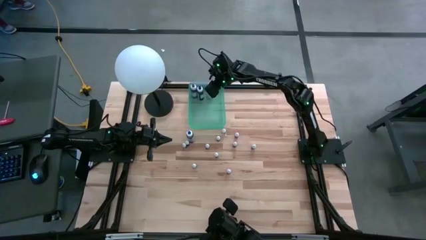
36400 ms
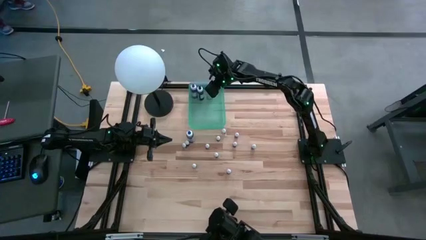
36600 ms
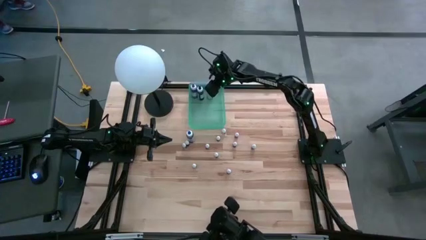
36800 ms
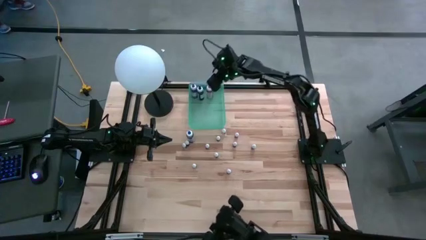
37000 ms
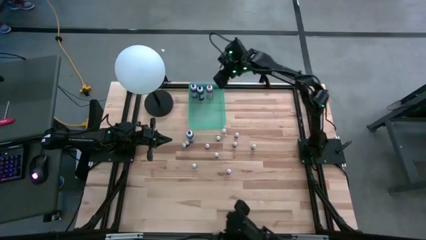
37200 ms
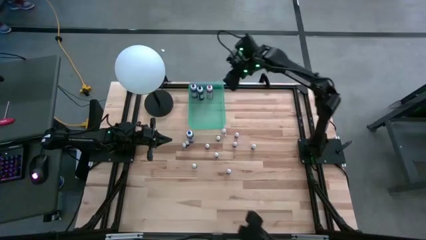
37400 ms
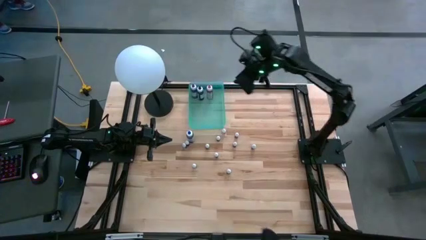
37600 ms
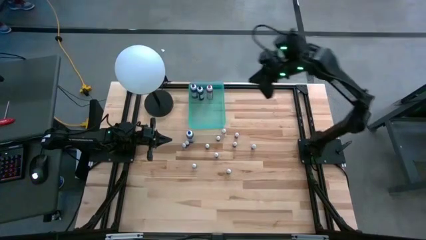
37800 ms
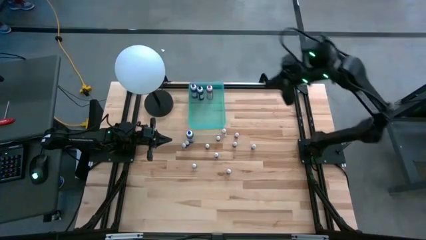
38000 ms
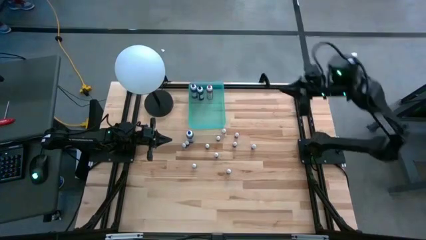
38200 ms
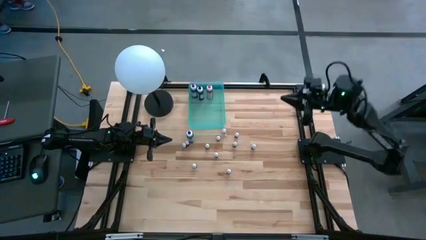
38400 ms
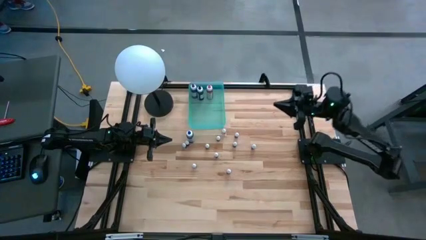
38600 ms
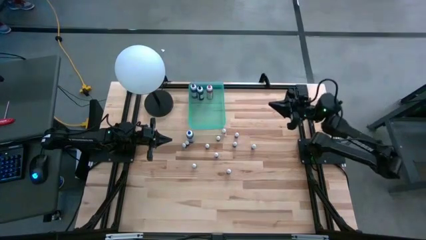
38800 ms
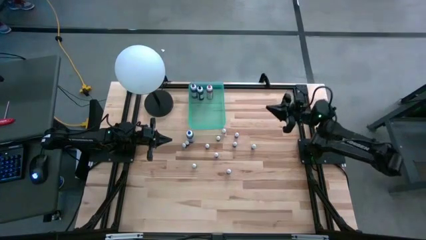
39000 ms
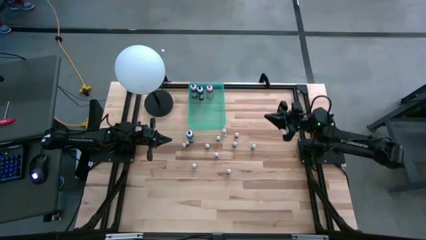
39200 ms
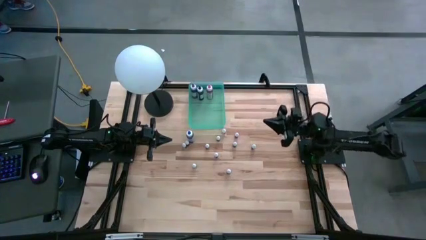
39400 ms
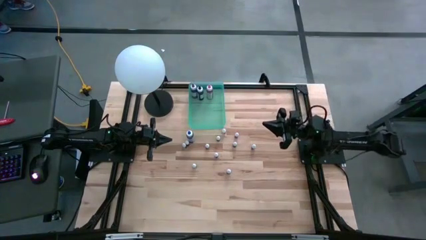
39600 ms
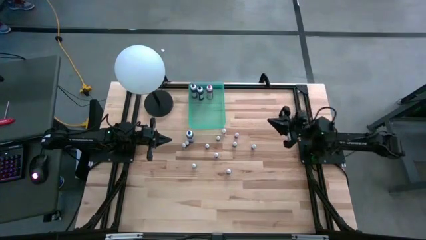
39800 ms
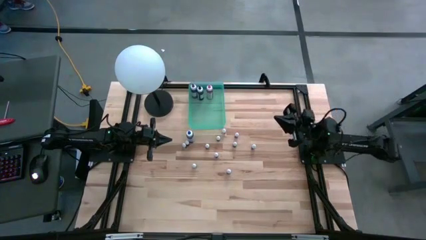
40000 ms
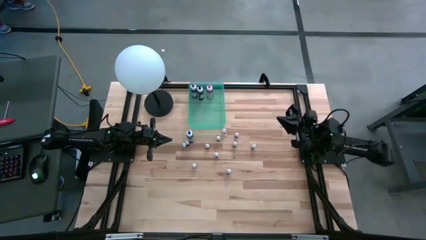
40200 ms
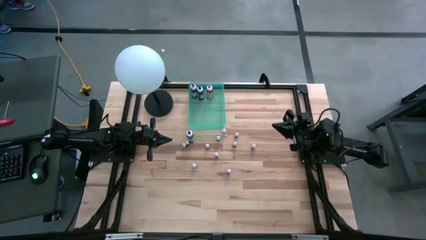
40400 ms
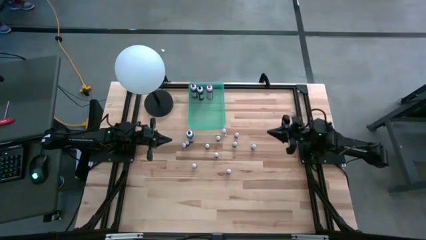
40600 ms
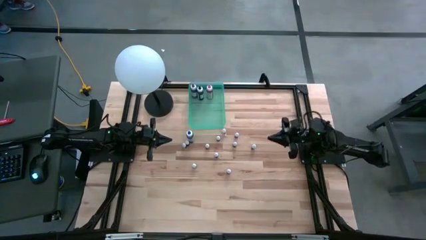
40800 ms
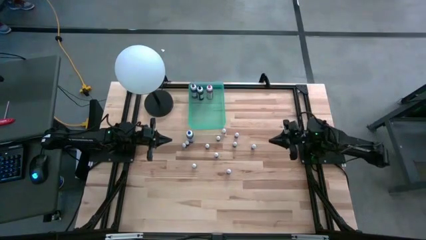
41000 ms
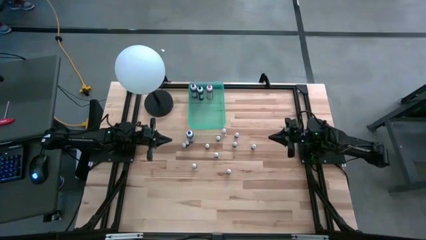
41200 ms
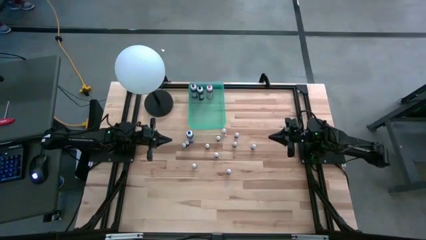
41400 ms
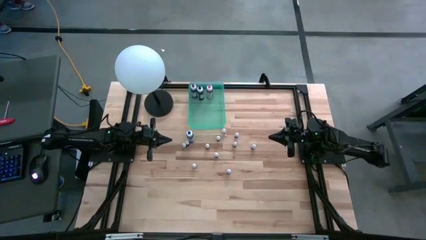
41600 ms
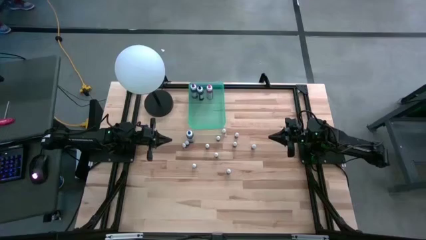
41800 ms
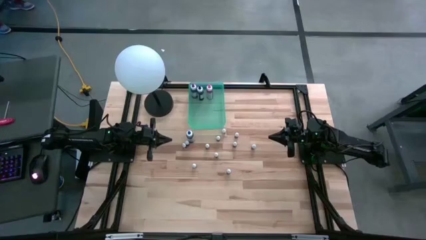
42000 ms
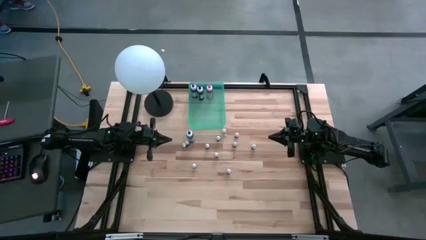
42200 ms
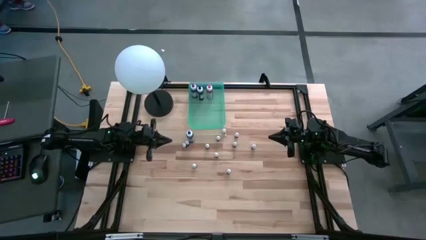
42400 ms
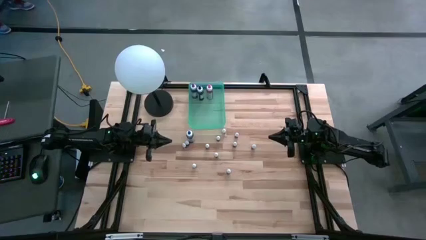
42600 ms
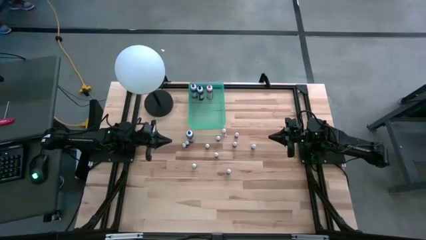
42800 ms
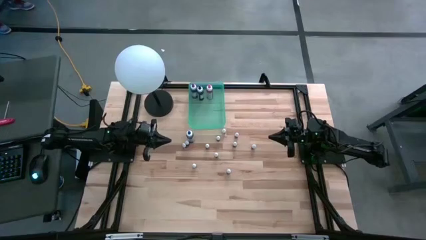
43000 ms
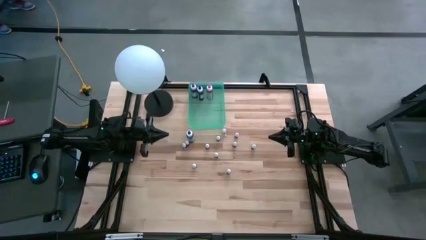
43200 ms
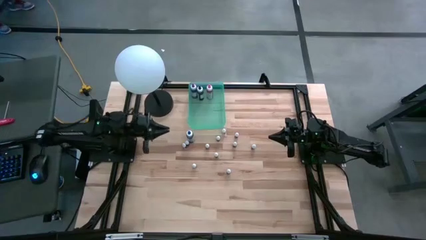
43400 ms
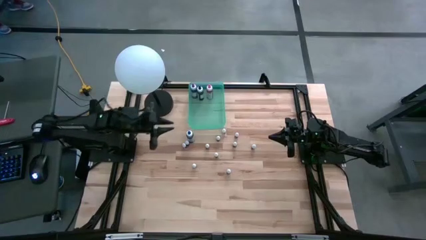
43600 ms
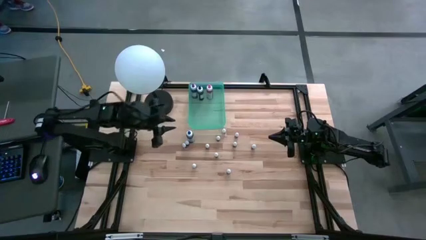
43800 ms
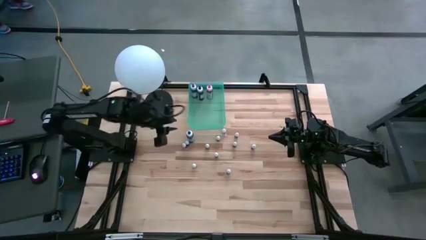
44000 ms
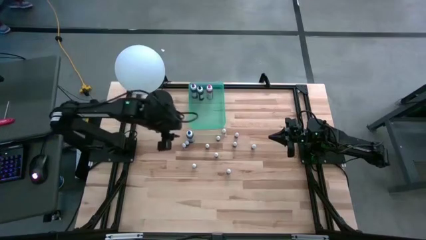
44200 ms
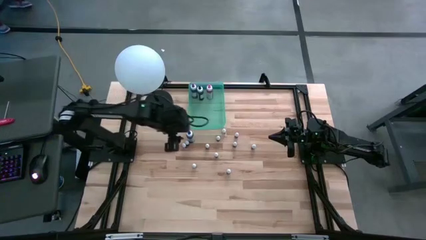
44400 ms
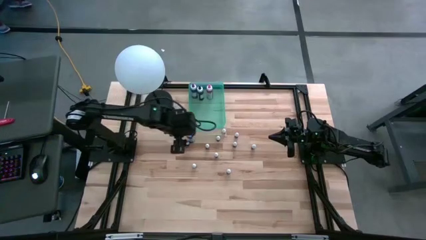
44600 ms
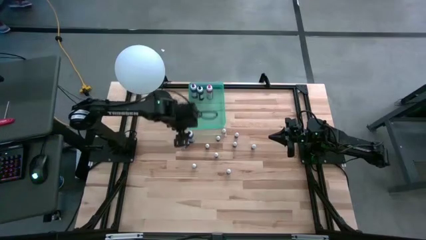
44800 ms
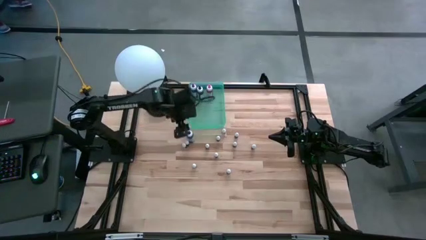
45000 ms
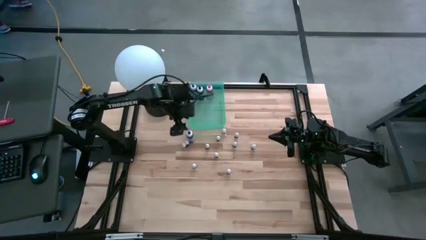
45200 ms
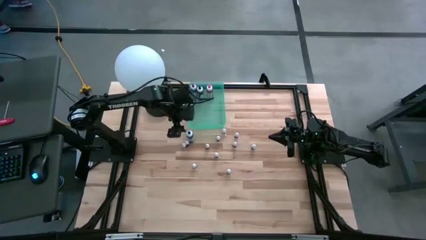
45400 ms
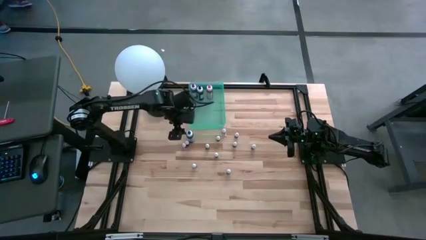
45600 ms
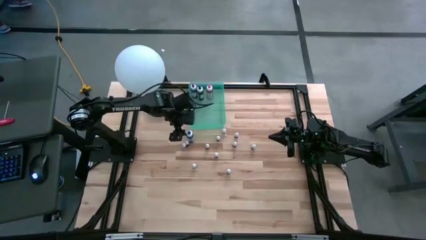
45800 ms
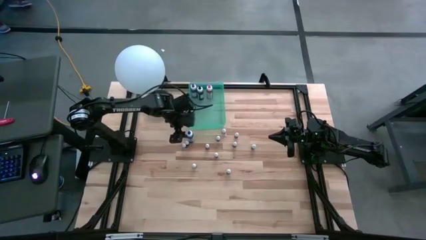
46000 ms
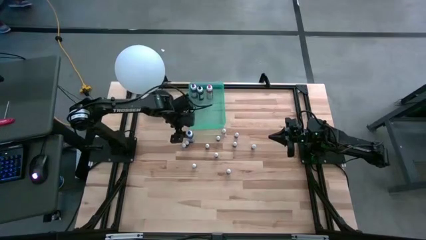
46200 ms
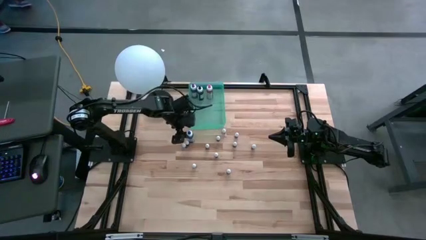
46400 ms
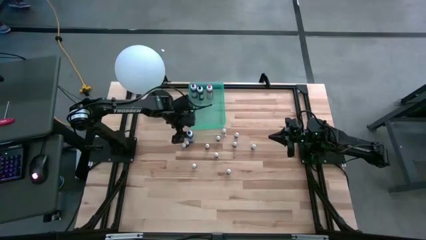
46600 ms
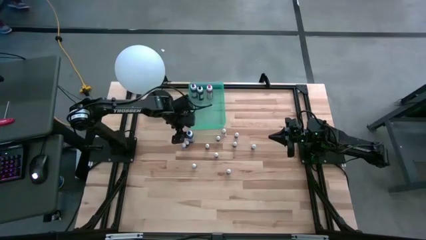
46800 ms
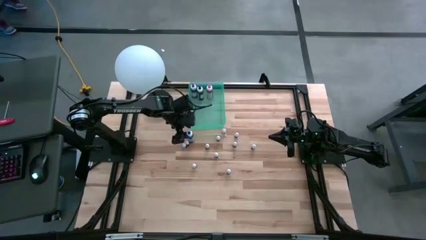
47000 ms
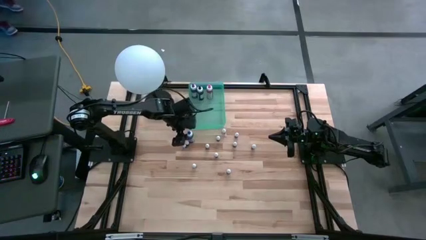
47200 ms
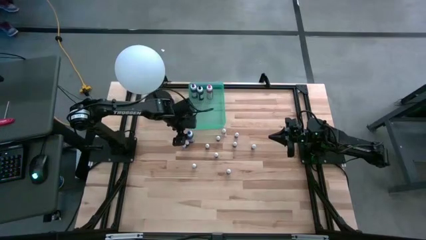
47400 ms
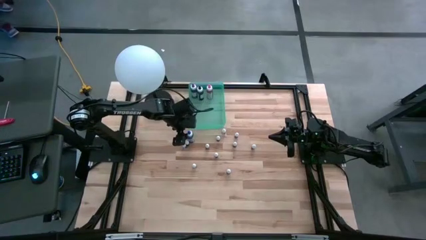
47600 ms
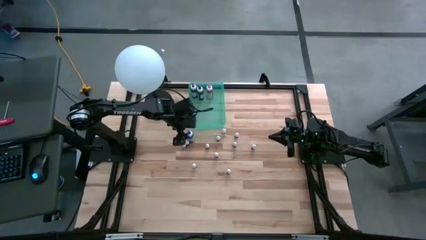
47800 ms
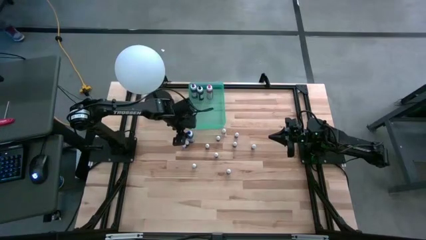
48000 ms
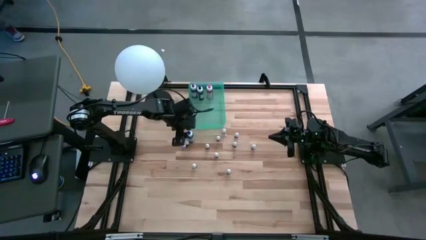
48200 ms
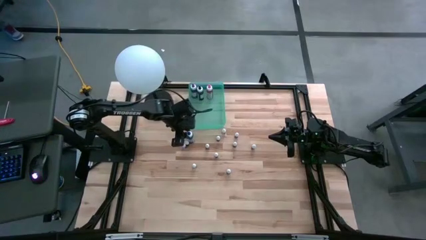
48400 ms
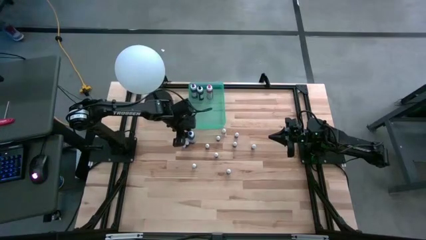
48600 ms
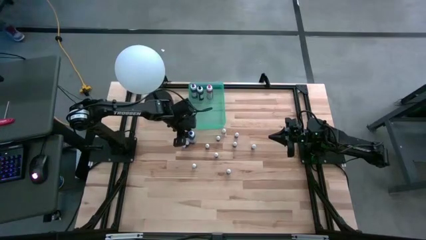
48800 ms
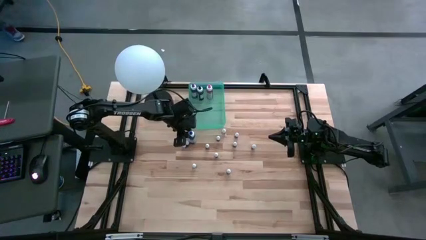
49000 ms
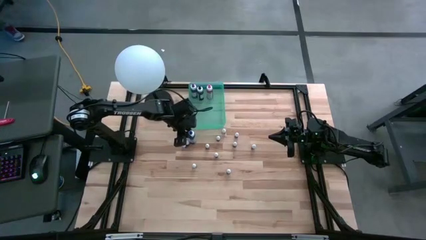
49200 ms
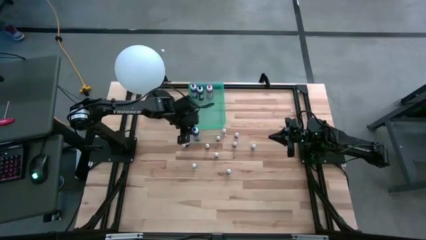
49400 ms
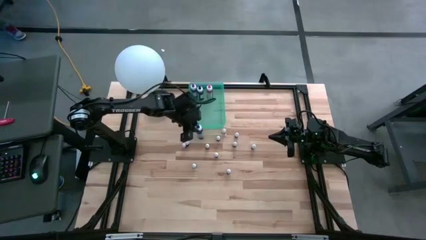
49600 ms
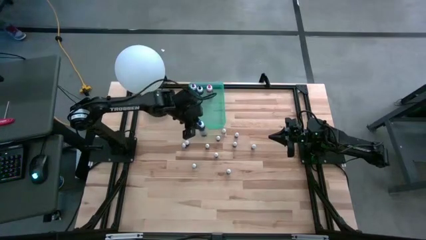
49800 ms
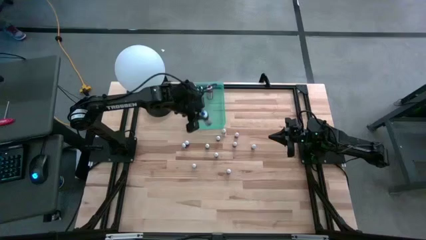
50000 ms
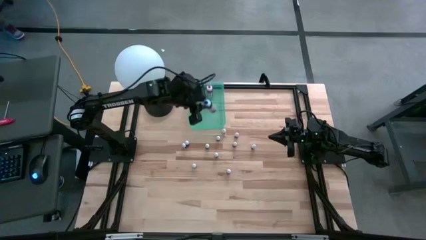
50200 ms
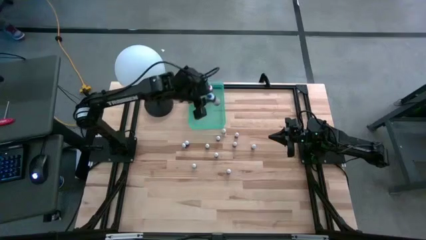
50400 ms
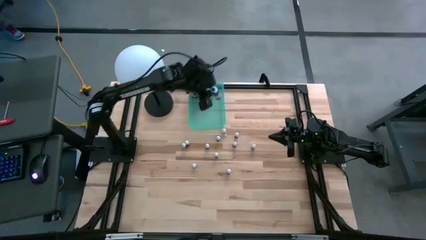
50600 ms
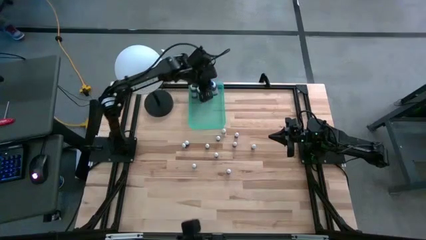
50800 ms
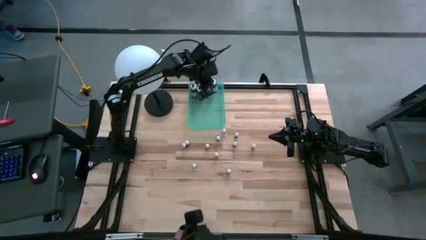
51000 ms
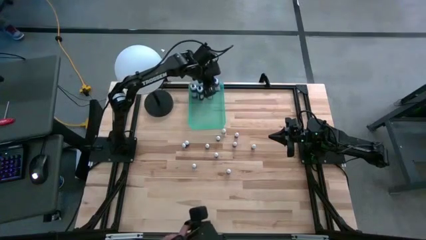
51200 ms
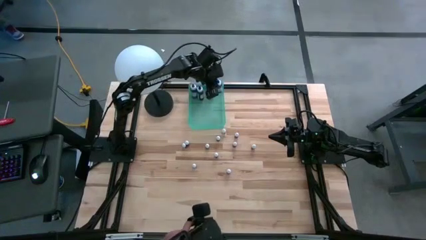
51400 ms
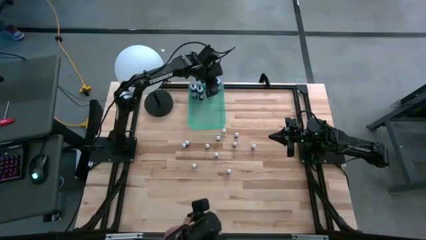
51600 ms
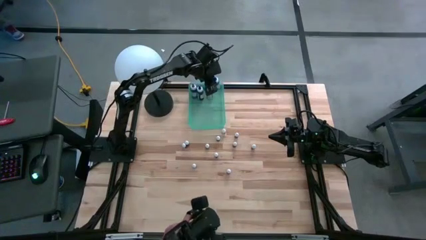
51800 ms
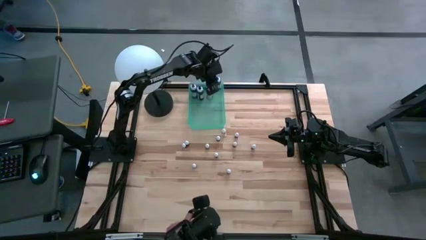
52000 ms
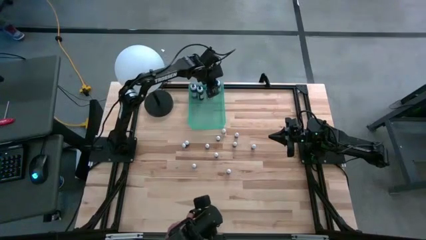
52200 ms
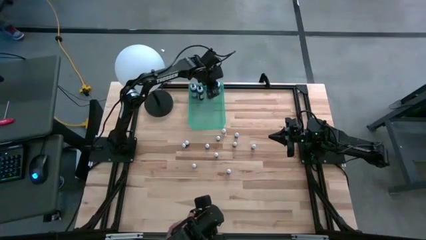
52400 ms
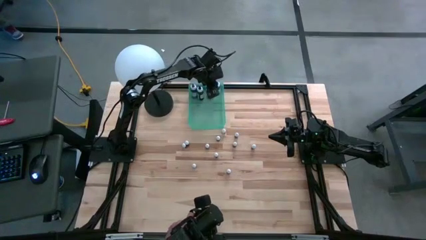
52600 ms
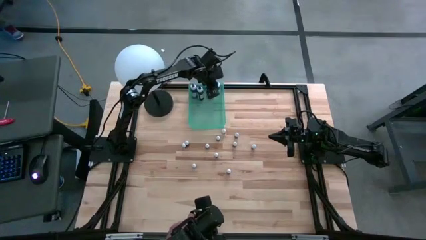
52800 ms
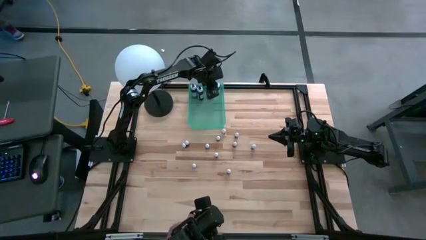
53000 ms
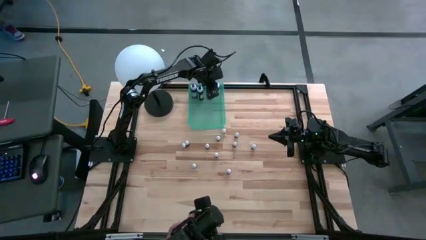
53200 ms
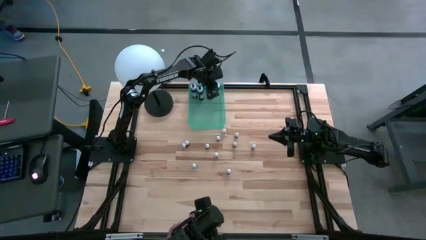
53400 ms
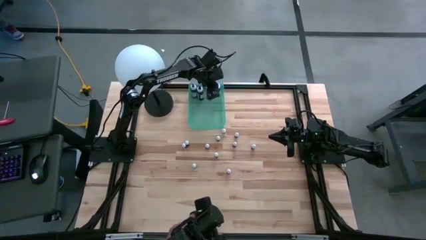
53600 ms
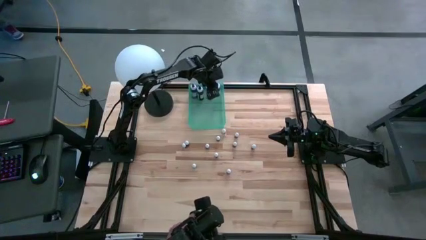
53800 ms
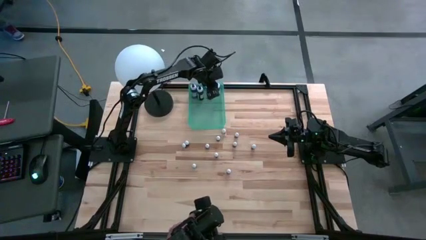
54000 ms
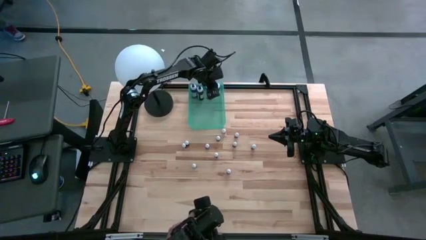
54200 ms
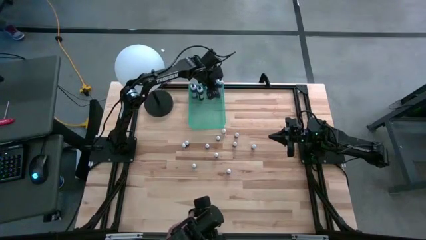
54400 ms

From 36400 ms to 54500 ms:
Task: Pick & Place food coloring
Put the large blue food coloring bottle into the blue bin
